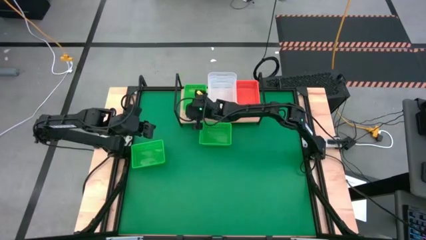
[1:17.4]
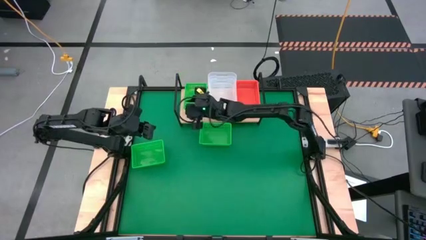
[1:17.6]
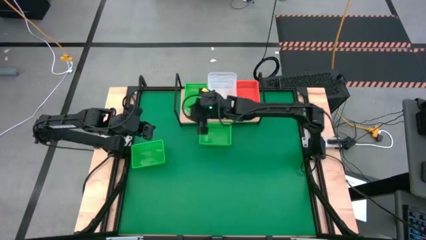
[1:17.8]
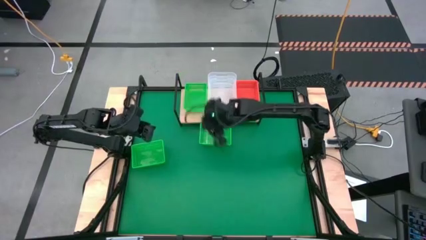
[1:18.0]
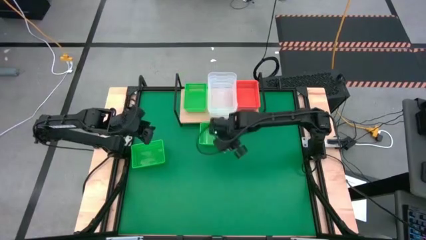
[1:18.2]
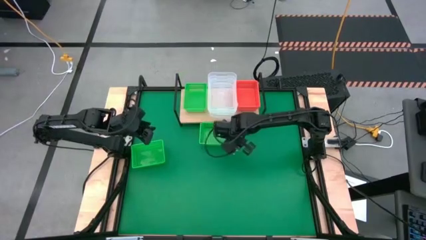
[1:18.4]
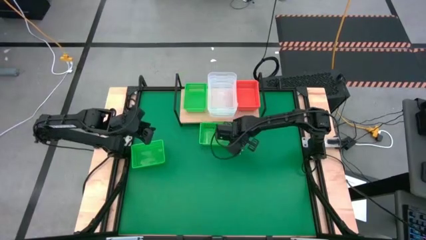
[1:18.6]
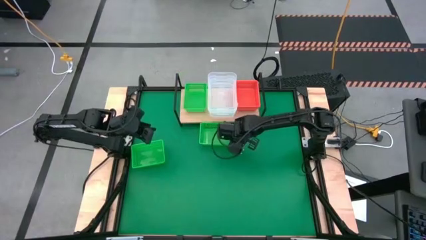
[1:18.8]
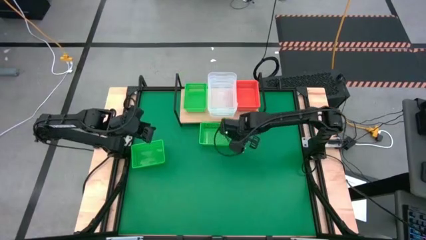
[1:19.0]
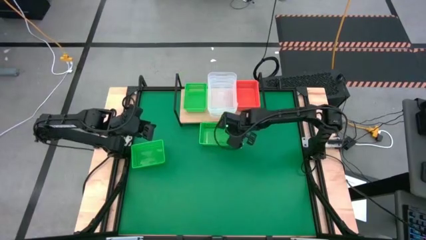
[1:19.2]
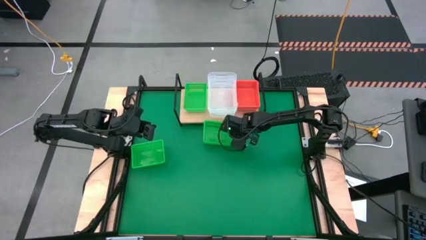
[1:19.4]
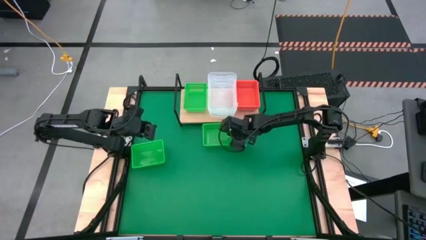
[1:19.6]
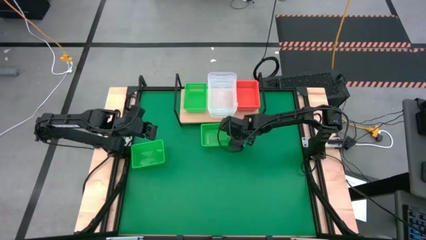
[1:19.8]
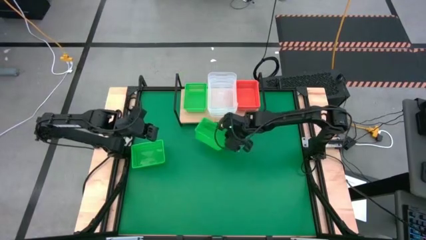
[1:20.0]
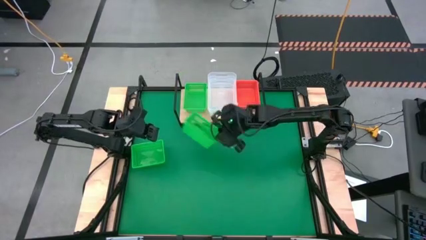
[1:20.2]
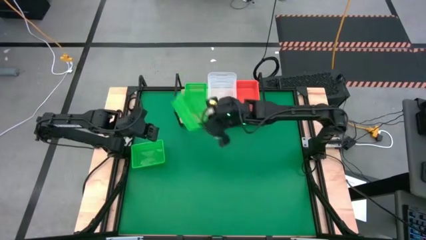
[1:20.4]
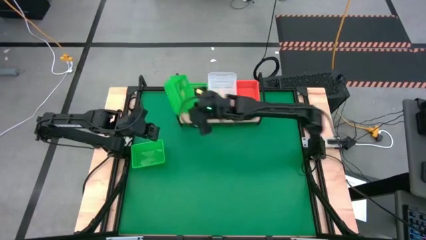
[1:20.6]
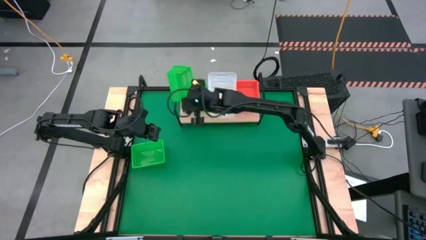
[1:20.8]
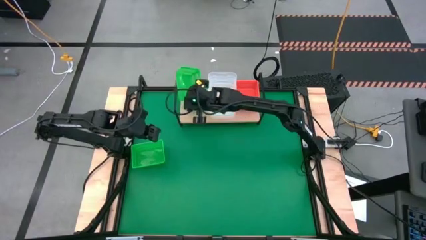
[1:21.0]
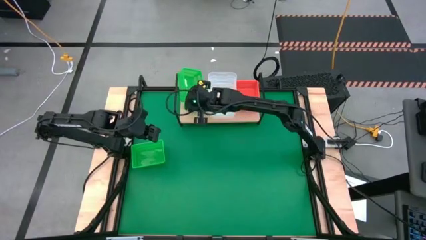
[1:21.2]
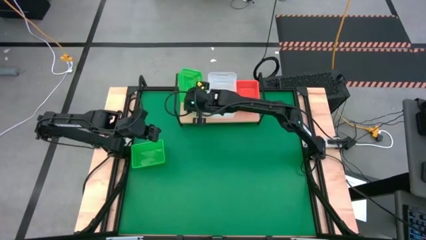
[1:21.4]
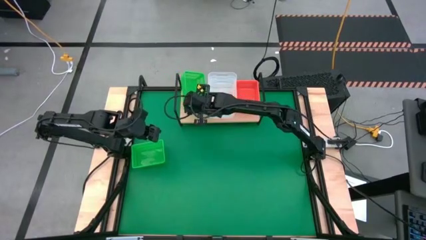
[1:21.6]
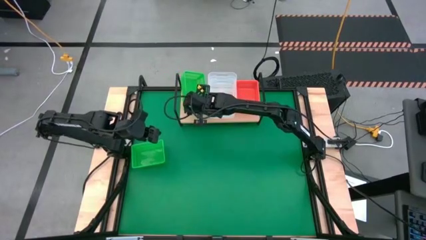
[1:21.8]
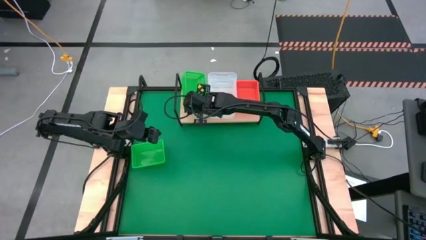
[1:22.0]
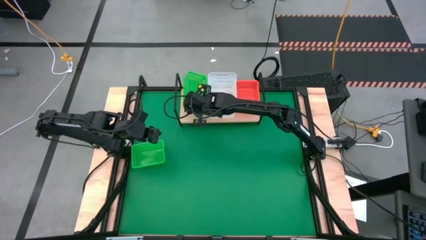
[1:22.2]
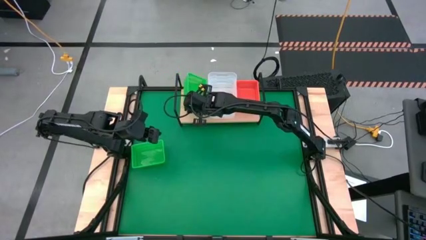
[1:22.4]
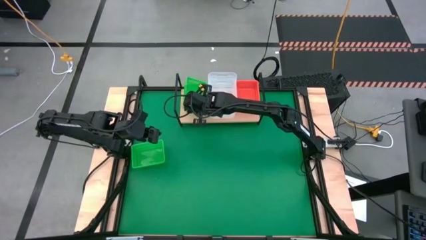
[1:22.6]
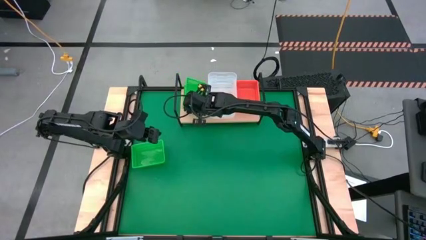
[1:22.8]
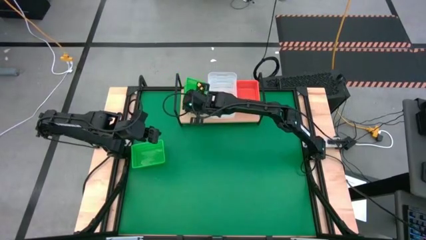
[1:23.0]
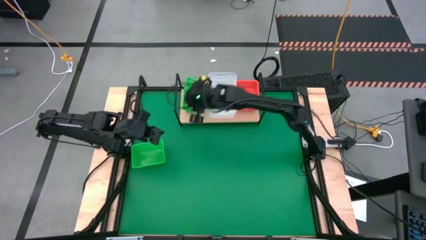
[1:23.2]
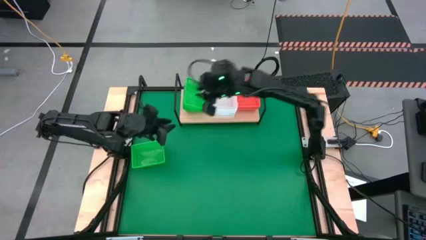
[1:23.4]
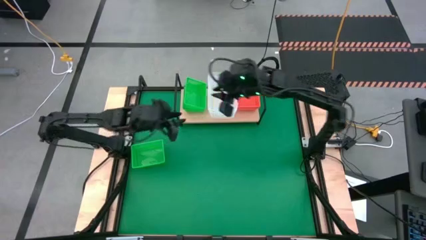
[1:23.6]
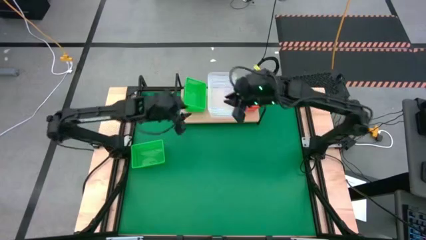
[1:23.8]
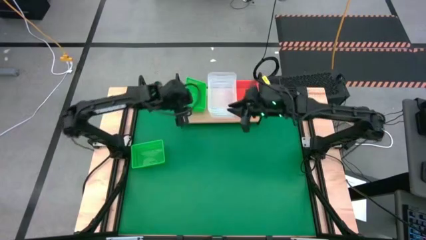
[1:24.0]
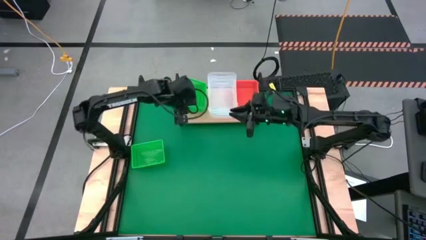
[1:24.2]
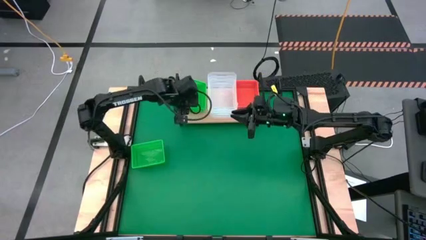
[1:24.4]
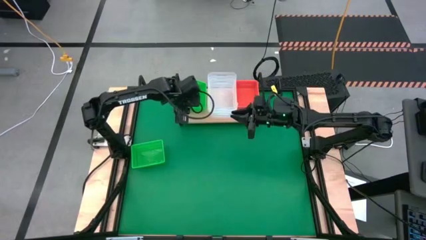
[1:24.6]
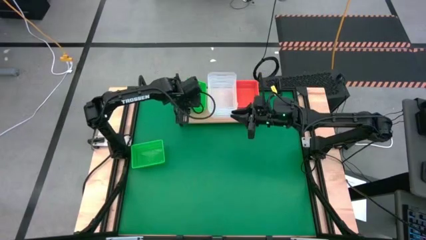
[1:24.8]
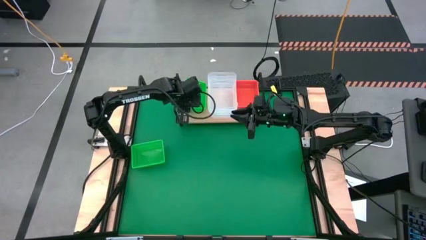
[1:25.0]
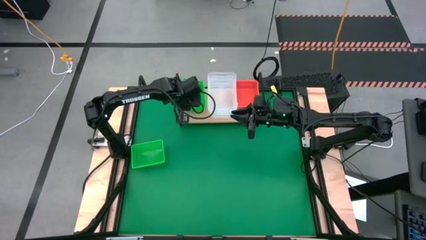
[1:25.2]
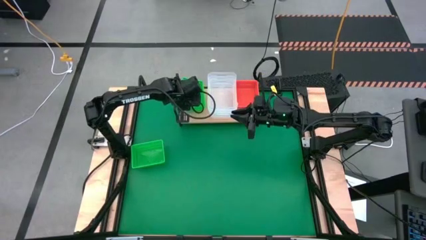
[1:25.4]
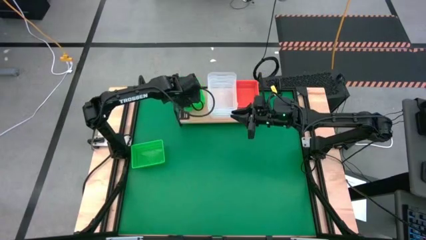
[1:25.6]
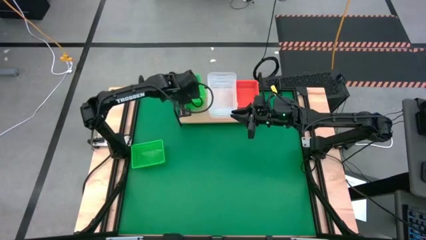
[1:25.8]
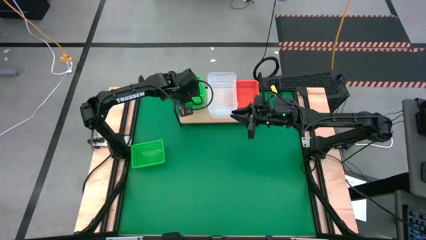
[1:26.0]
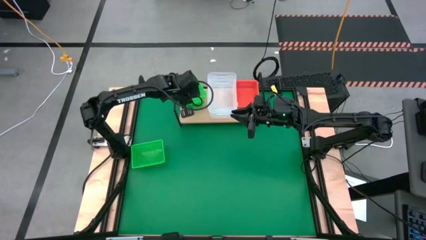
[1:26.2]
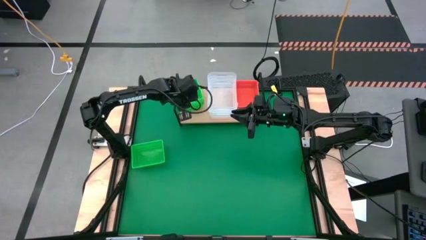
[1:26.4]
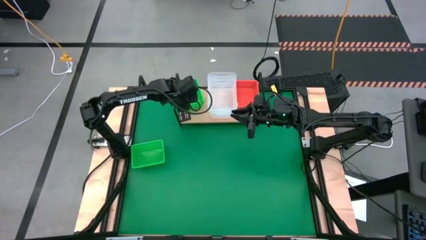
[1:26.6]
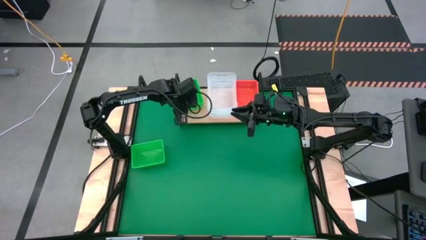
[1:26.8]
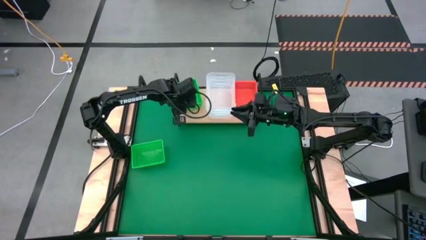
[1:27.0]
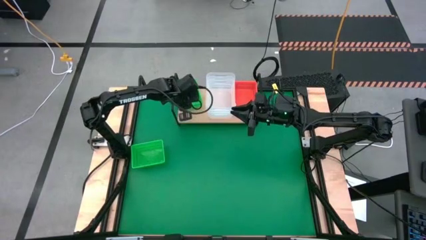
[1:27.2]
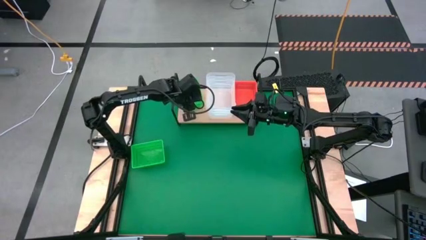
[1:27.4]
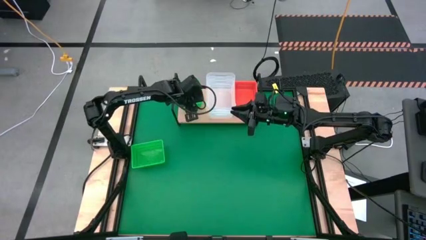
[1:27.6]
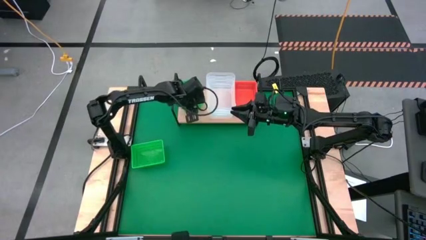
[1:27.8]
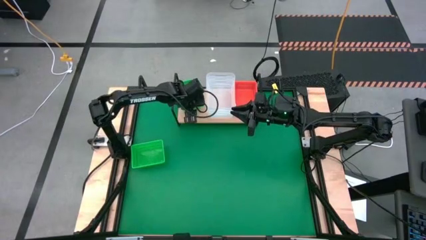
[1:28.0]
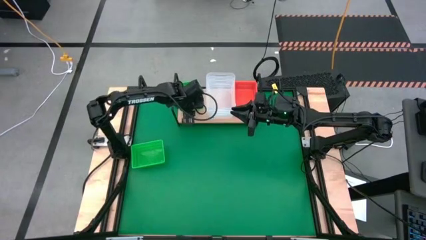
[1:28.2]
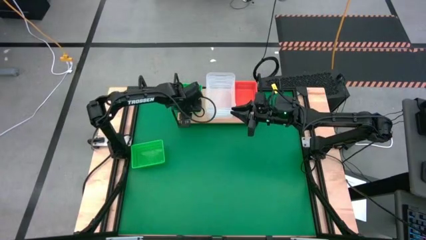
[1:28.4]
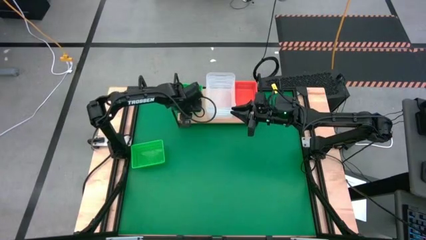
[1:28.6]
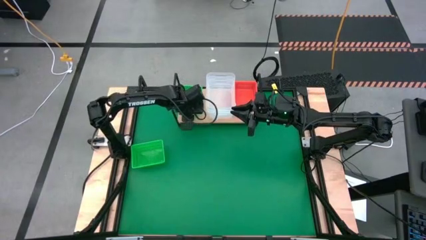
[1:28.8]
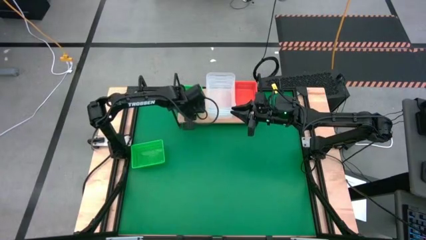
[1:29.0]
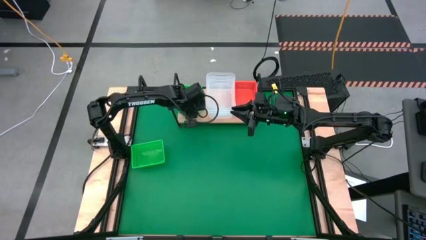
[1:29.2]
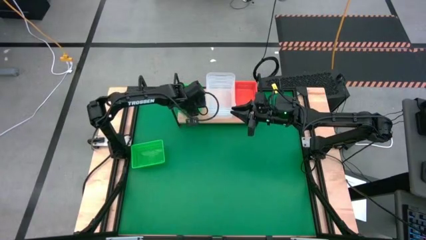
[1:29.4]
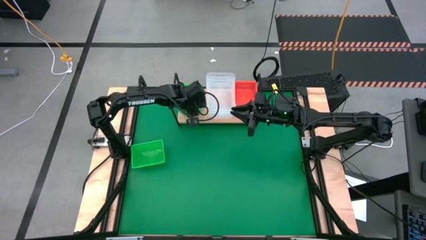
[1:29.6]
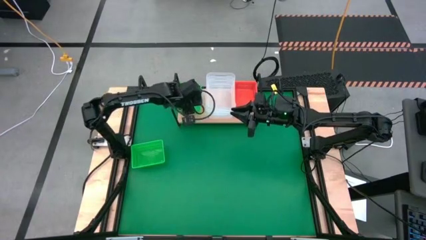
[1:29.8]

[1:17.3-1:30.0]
Task: Stack baskets on shelf by color
Stack the right green bin on top of the green bin on the shelf

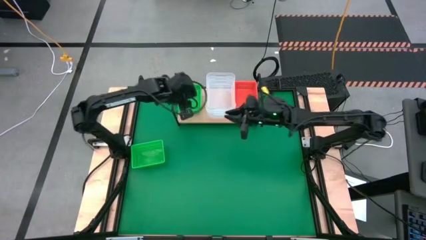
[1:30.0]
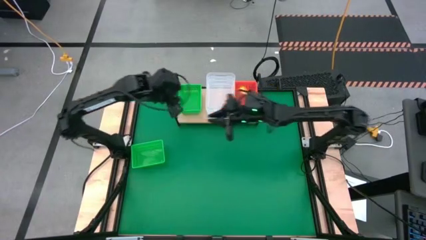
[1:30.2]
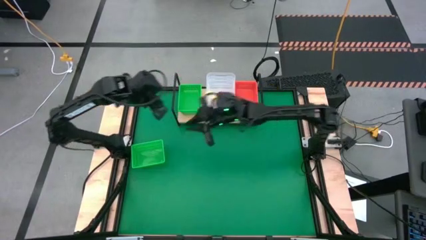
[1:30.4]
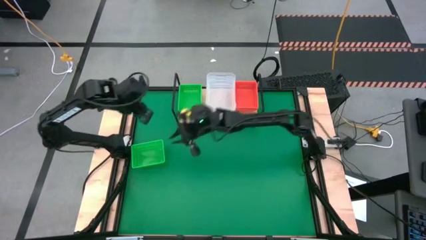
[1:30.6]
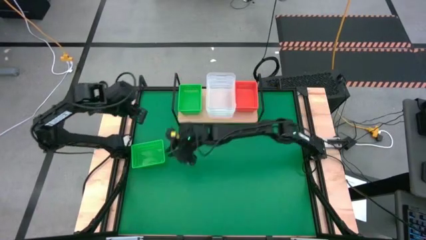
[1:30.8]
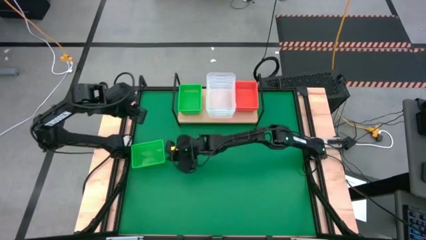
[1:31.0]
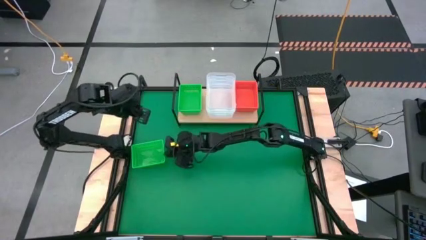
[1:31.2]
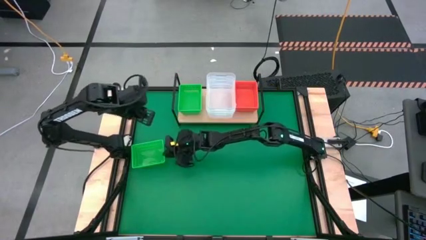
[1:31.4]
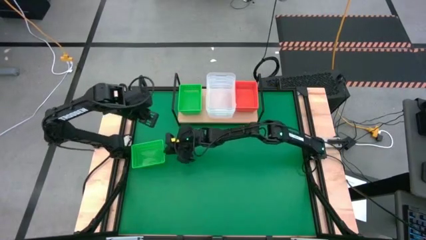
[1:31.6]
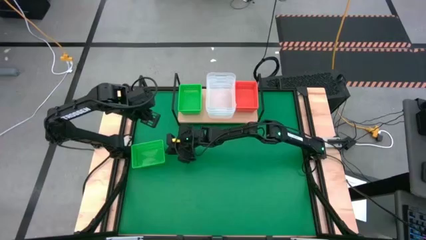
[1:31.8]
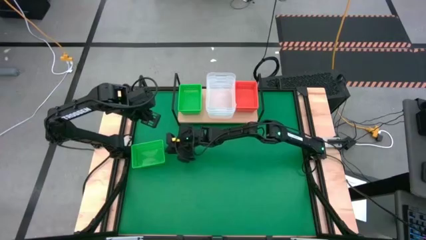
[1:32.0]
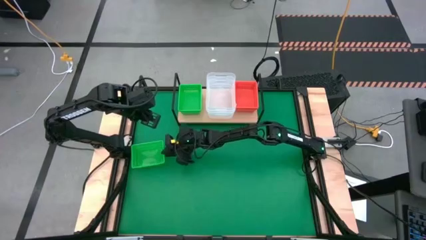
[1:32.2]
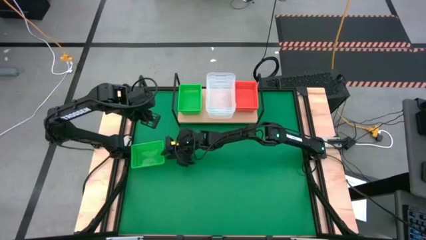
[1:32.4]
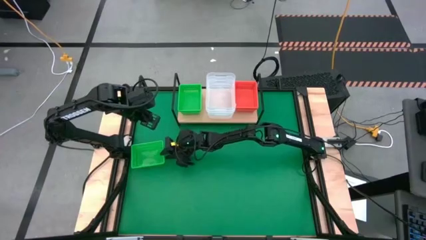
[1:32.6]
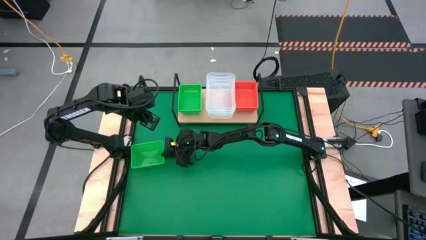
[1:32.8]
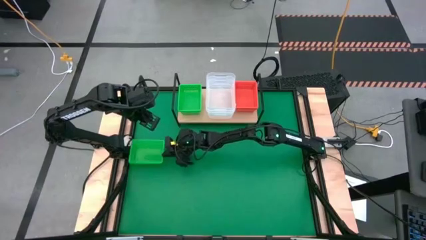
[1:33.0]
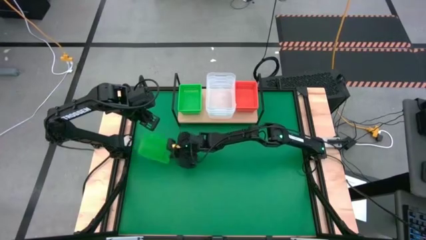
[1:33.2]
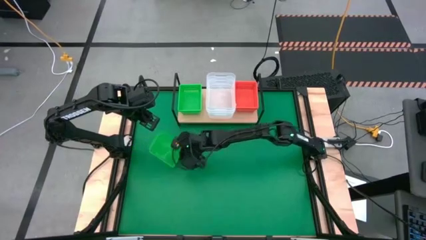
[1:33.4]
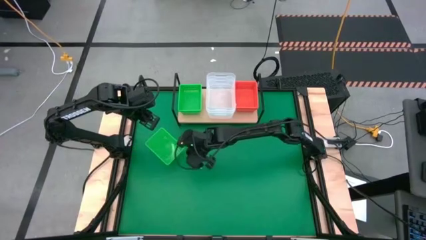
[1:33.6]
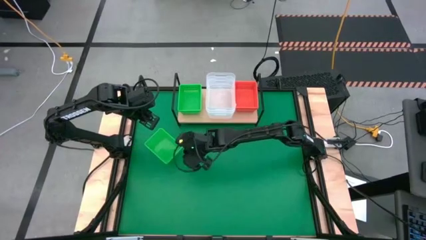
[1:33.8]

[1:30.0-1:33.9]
Stack the green bin on top of the stacked green bins on the shelf
